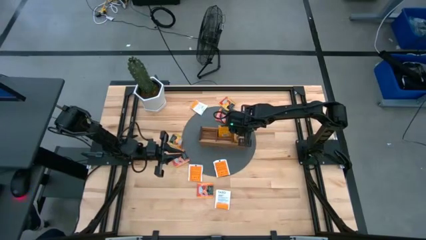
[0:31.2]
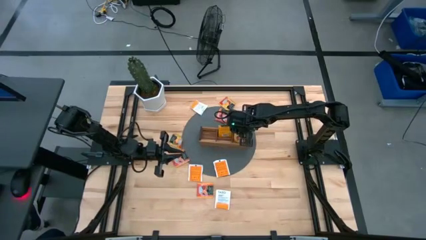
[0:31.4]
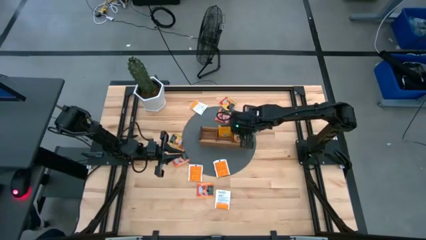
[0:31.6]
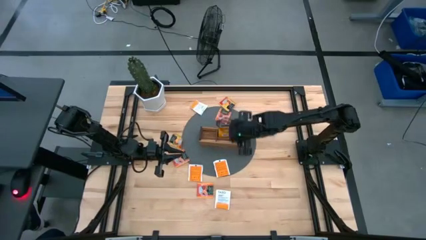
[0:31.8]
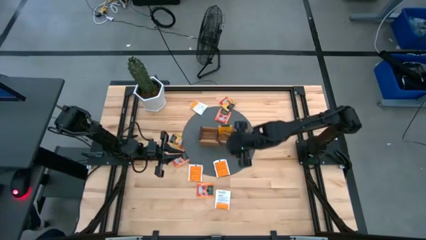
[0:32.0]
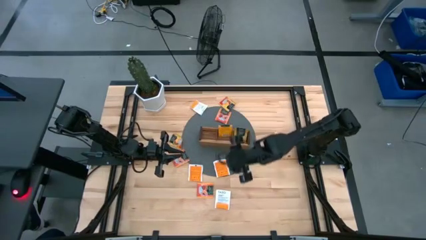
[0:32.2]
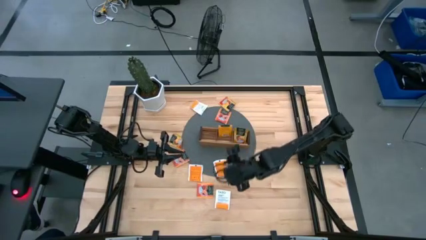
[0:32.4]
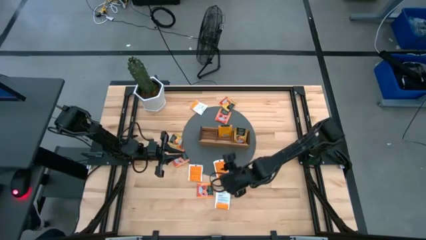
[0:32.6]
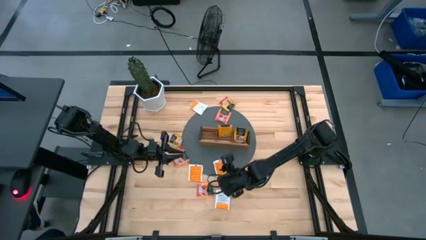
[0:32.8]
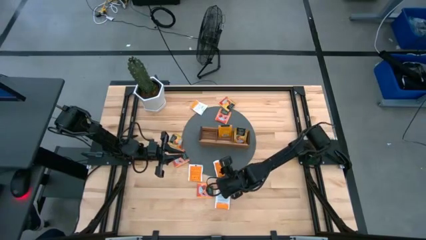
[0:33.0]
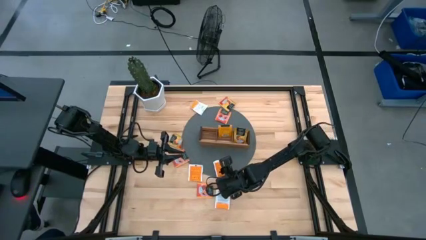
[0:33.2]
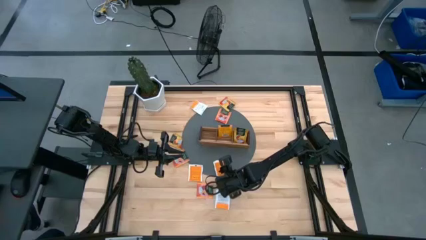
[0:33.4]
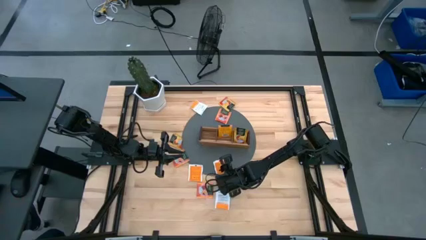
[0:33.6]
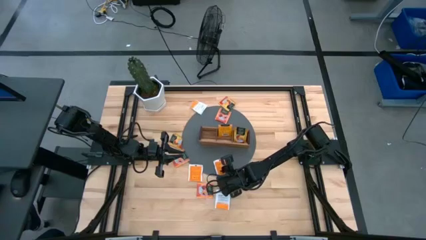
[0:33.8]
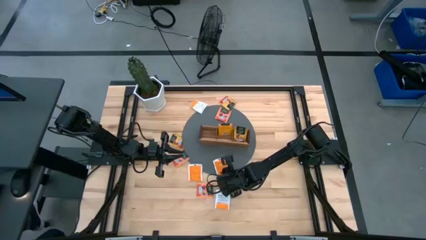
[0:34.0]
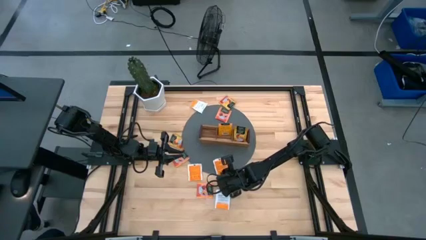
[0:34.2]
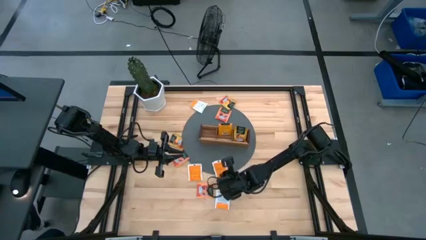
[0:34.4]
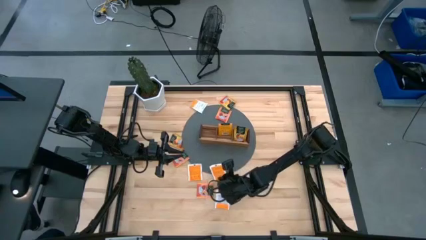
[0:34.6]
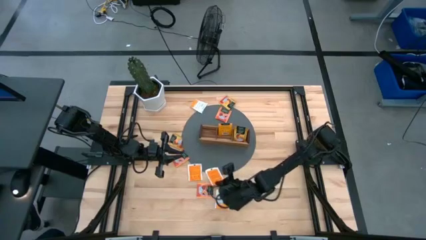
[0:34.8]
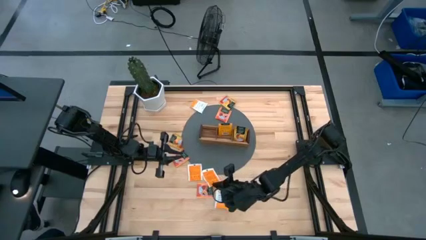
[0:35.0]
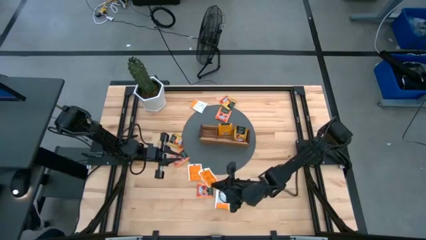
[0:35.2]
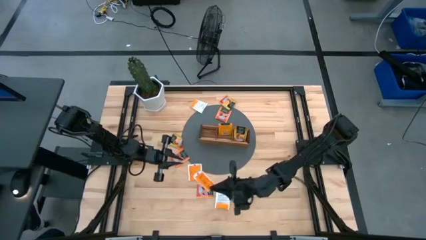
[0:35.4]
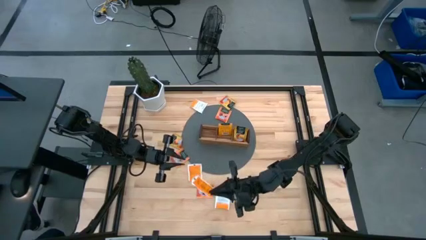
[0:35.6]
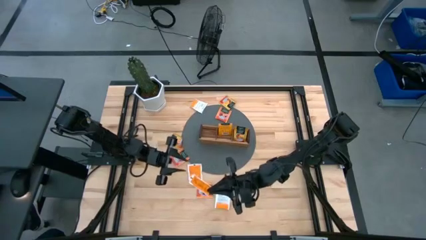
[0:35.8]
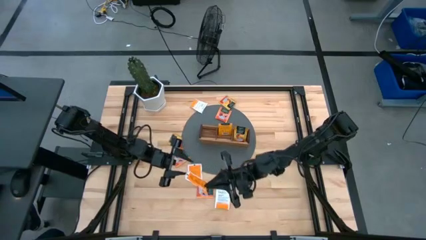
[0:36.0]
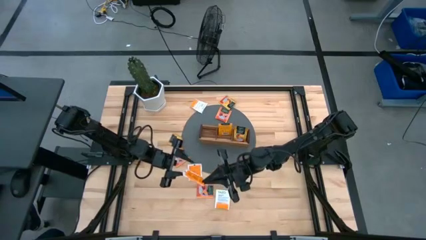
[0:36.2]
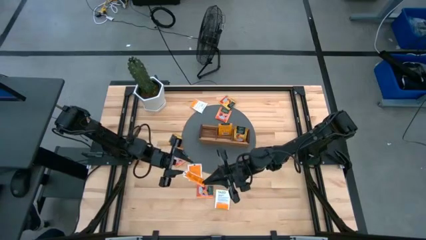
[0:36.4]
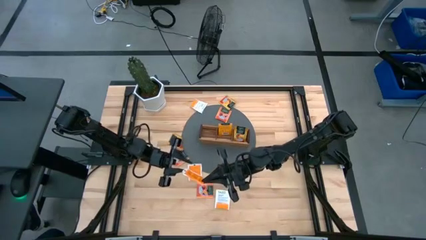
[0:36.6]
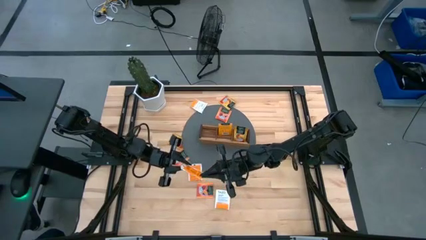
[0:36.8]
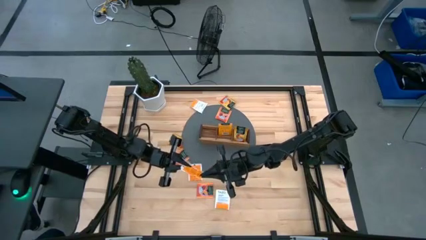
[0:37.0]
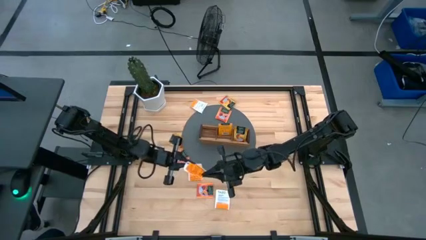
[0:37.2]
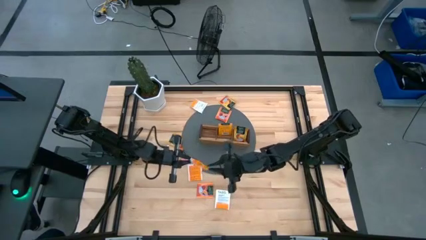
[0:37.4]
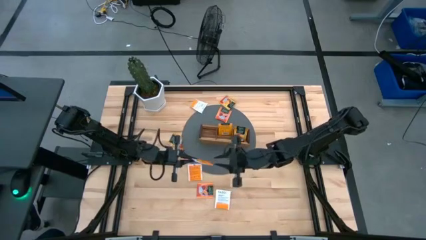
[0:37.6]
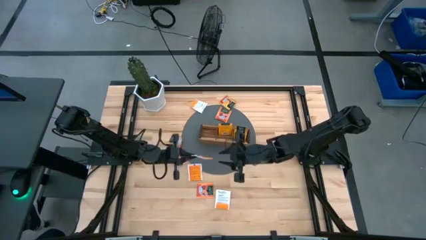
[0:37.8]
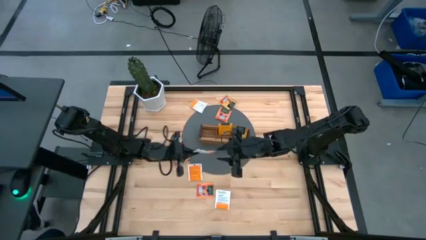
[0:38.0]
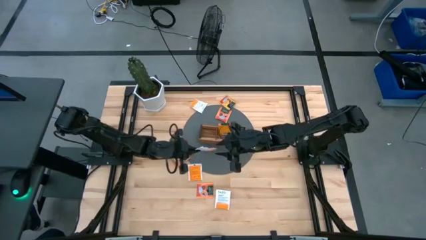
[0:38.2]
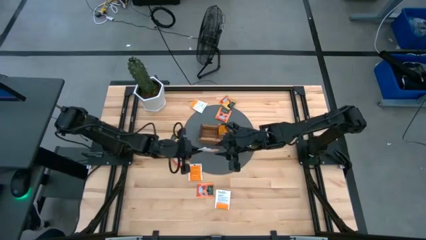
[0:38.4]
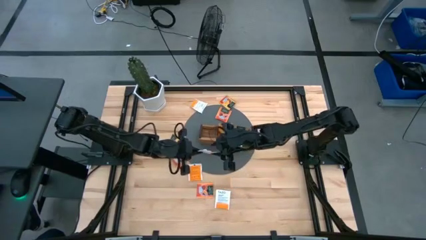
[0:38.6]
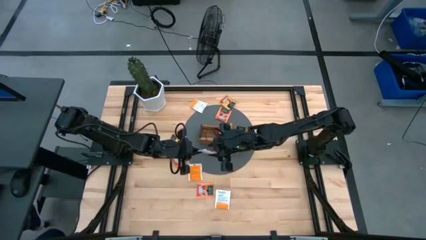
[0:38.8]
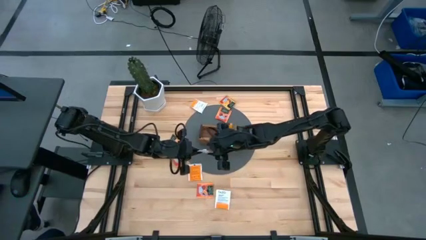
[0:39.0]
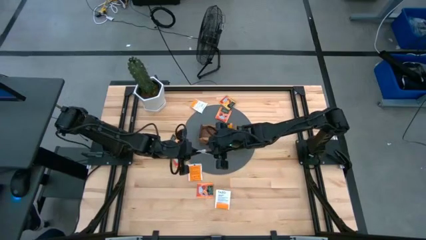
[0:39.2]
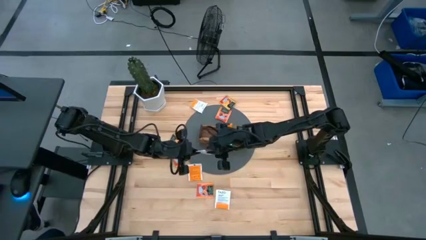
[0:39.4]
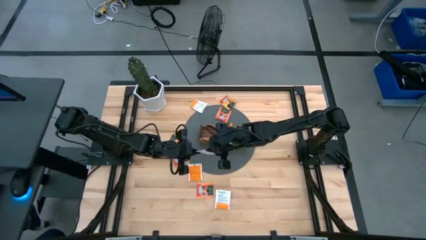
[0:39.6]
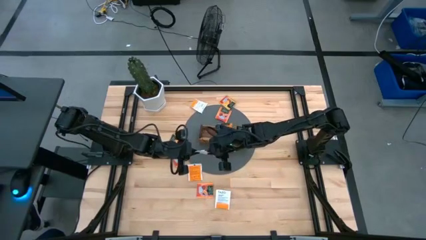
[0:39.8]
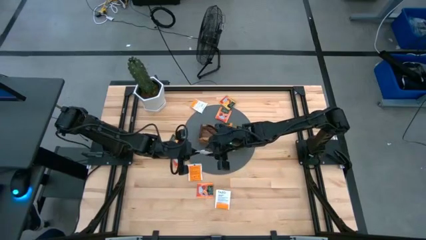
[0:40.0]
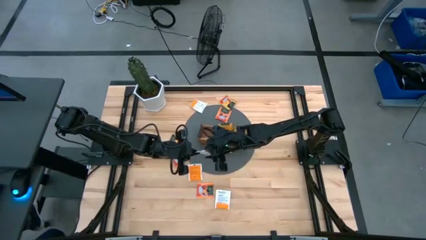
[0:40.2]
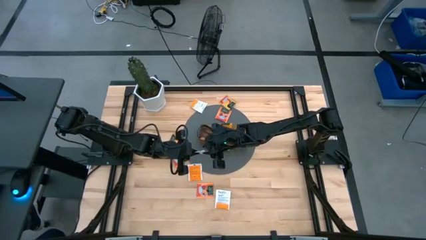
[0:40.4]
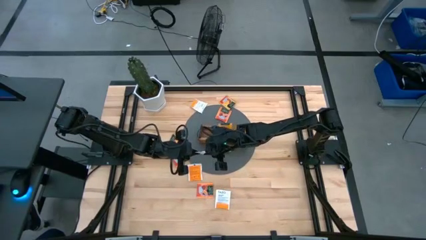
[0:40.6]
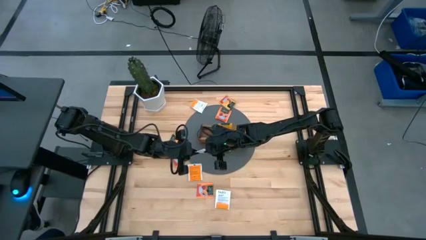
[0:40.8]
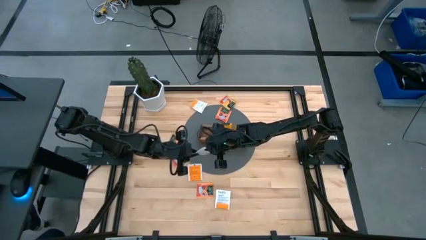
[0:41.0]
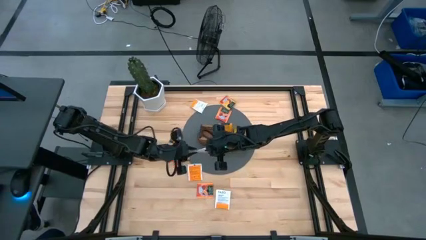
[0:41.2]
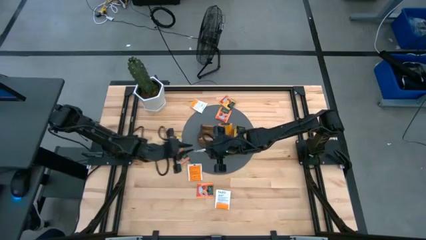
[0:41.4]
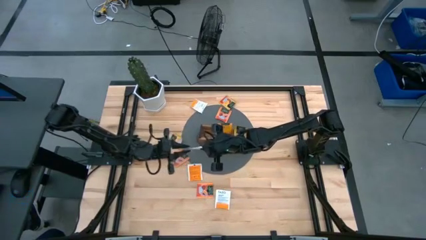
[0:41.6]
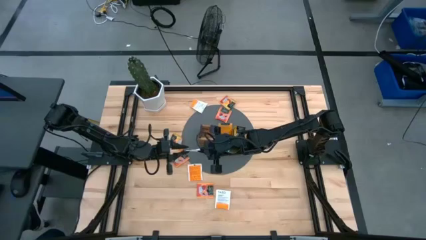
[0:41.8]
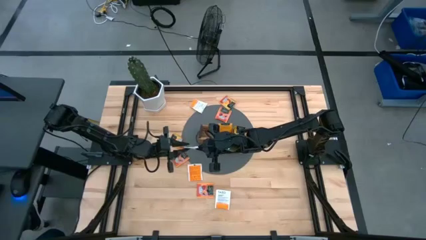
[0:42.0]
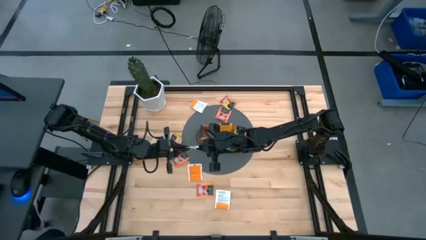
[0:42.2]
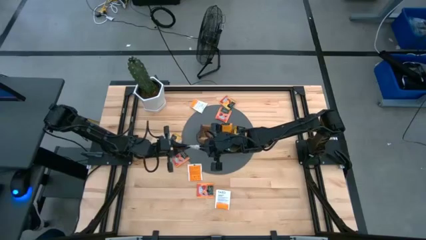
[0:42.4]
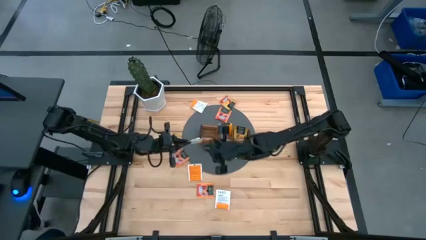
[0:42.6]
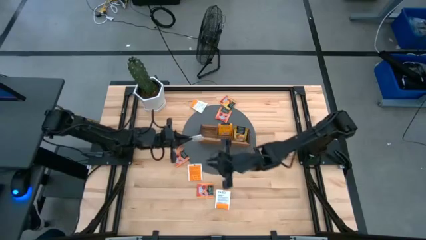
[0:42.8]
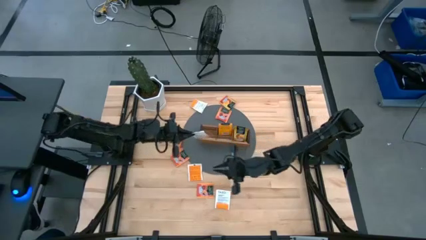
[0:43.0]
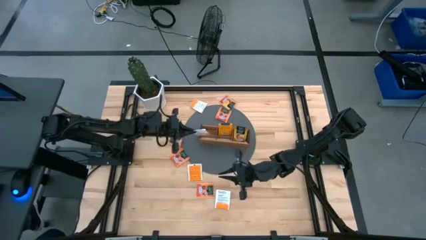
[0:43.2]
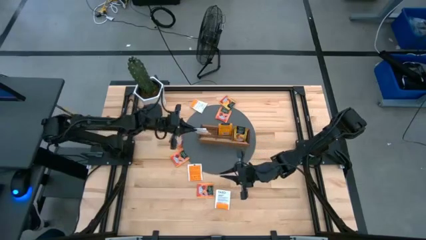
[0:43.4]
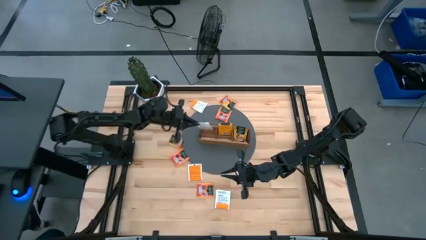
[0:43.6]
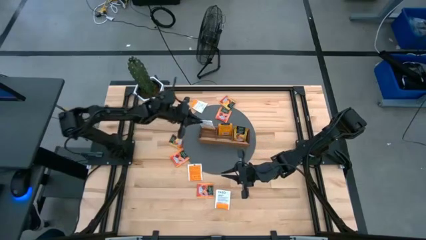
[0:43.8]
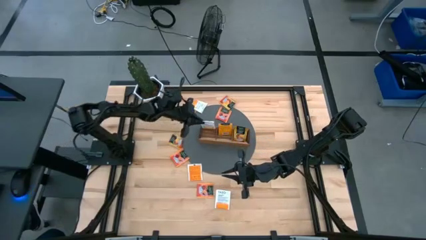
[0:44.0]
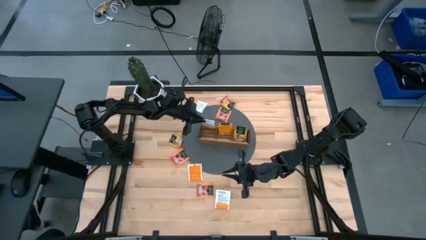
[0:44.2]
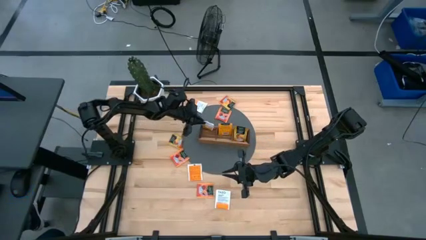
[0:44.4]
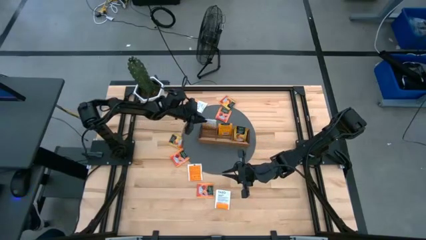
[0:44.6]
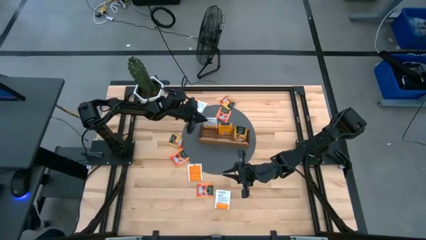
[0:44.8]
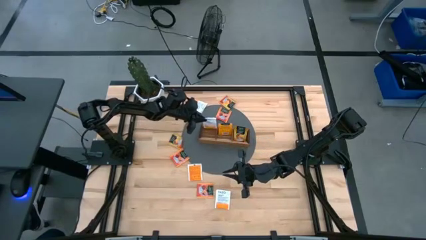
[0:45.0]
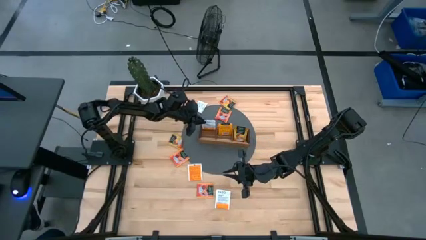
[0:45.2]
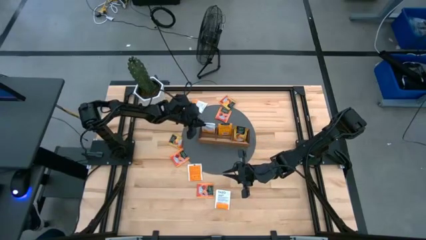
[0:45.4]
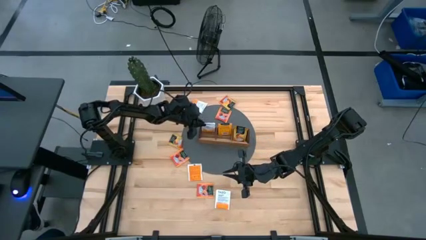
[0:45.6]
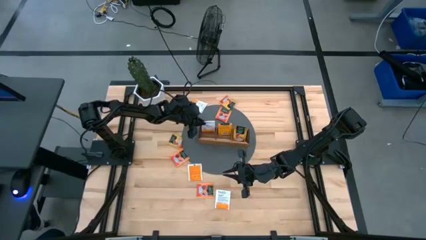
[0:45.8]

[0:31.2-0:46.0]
Task: Pick & Place Tea
Put the white tea bag into the left section of the wooden organizer
